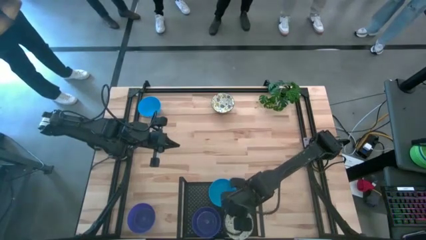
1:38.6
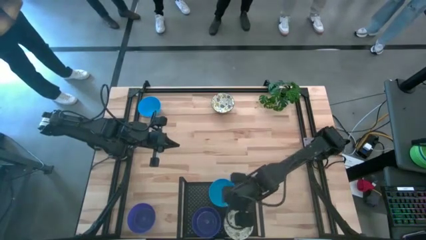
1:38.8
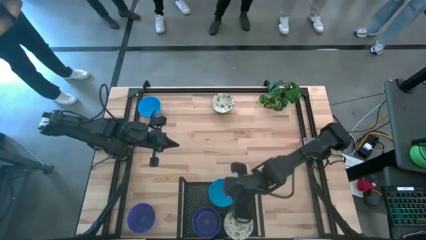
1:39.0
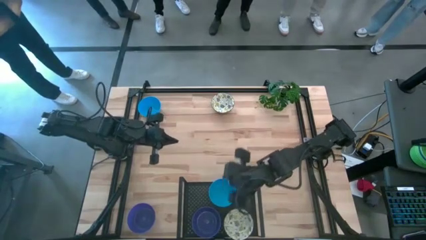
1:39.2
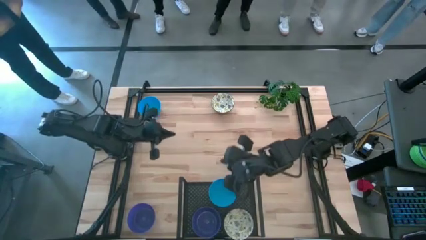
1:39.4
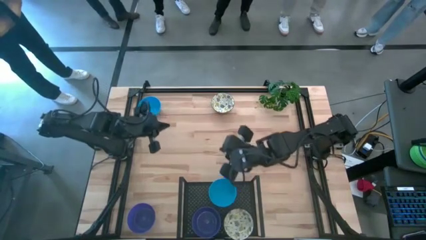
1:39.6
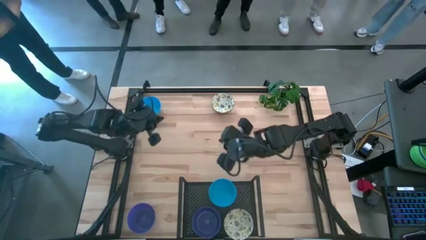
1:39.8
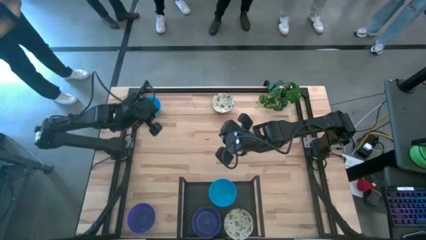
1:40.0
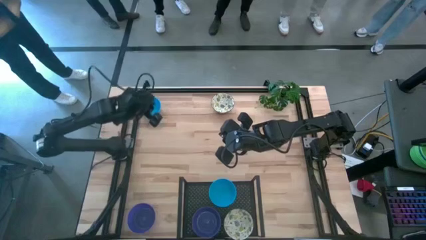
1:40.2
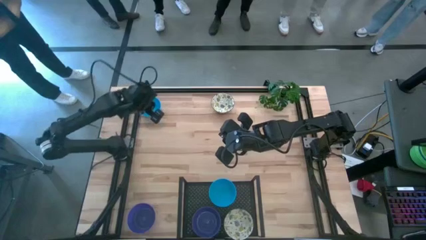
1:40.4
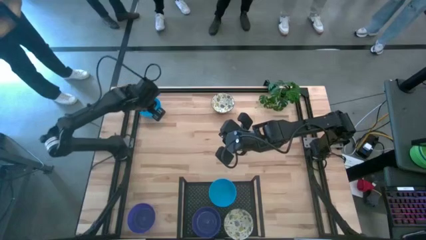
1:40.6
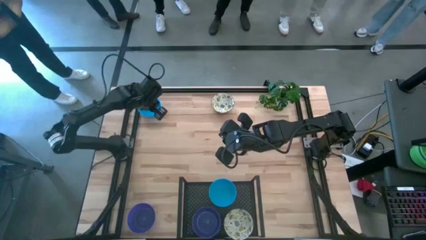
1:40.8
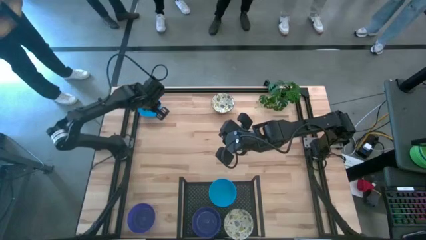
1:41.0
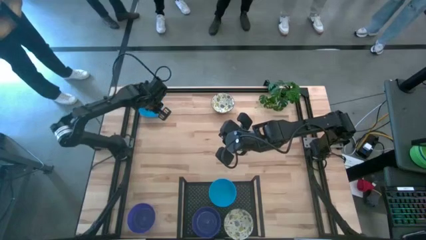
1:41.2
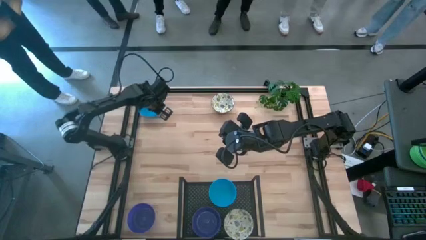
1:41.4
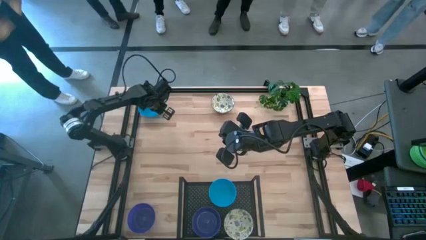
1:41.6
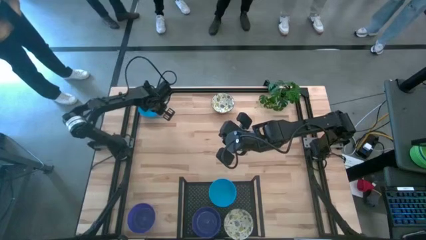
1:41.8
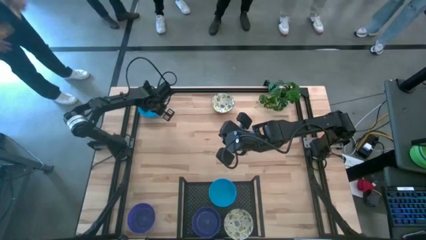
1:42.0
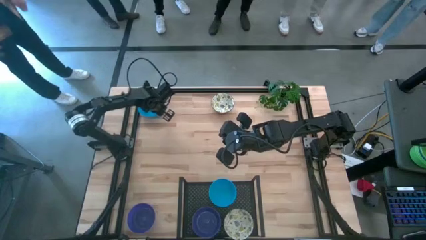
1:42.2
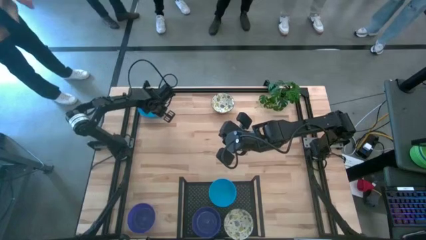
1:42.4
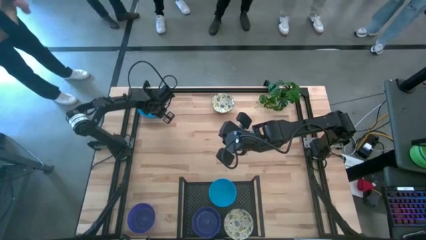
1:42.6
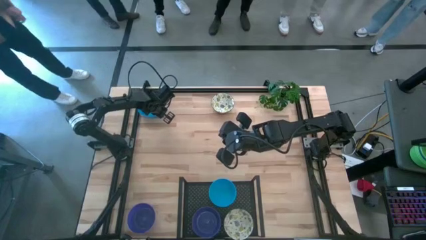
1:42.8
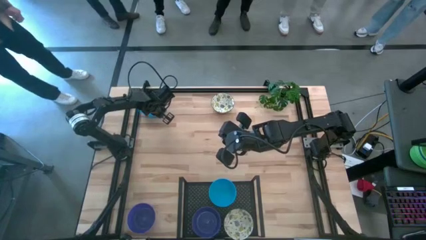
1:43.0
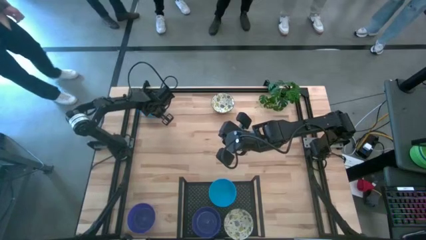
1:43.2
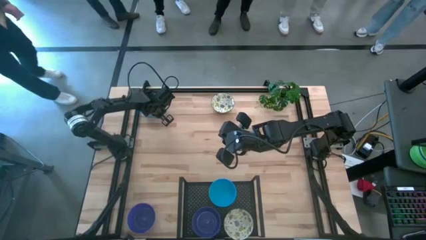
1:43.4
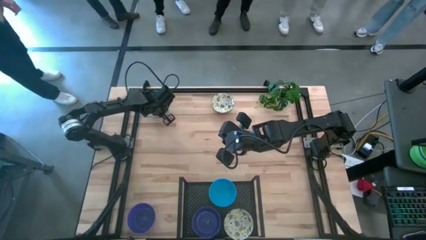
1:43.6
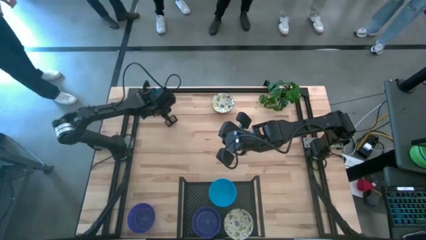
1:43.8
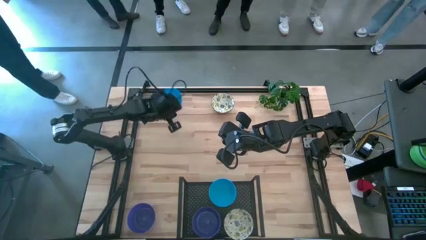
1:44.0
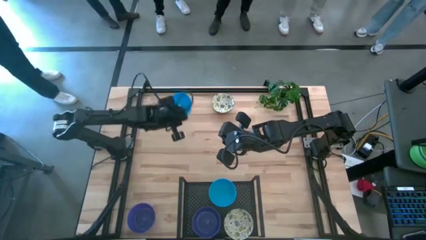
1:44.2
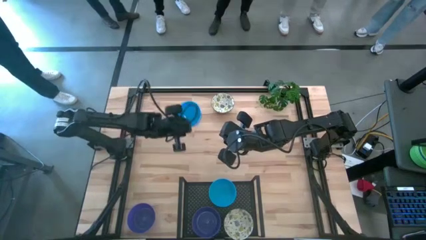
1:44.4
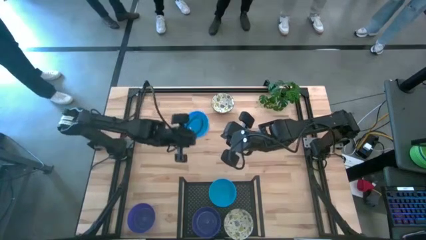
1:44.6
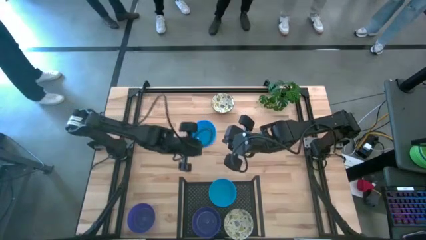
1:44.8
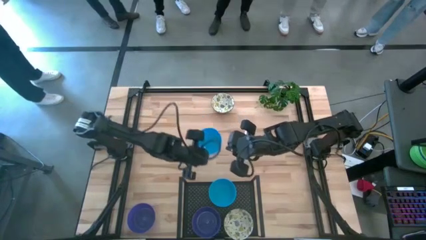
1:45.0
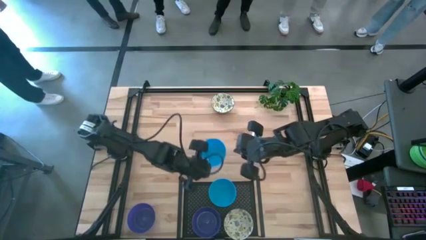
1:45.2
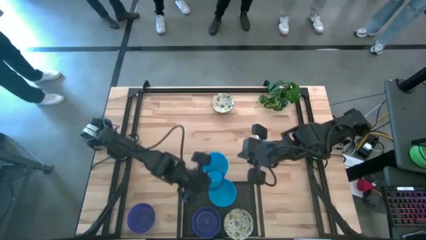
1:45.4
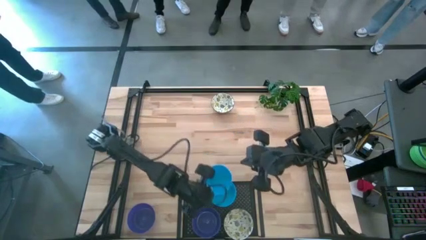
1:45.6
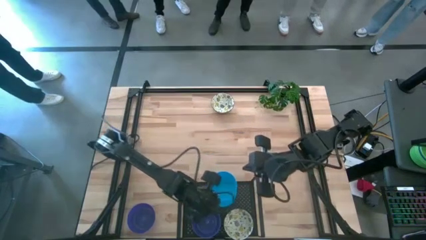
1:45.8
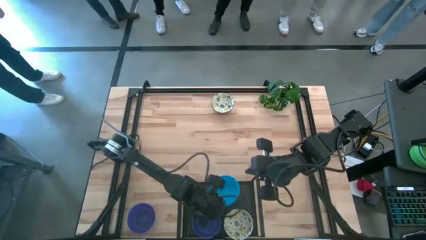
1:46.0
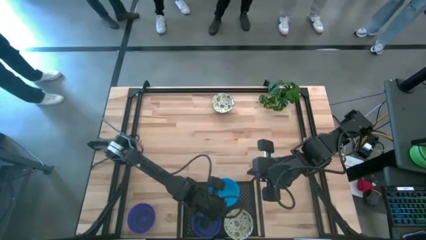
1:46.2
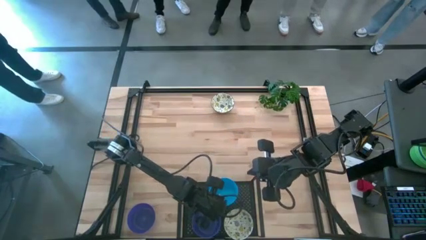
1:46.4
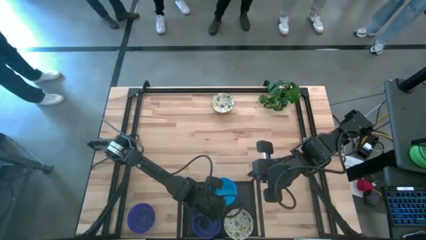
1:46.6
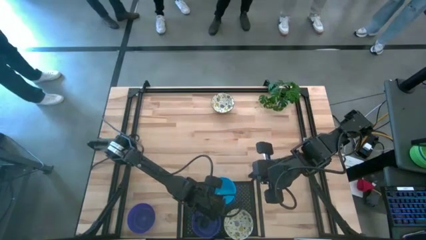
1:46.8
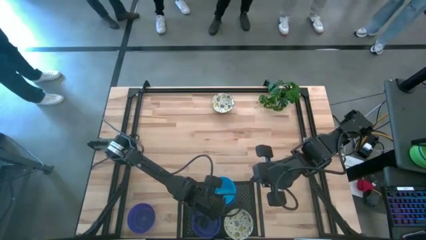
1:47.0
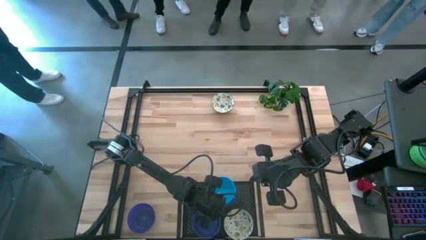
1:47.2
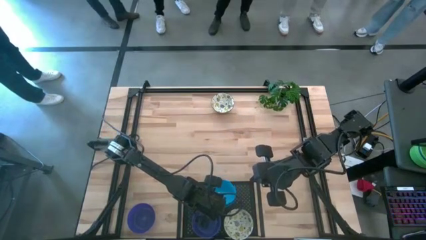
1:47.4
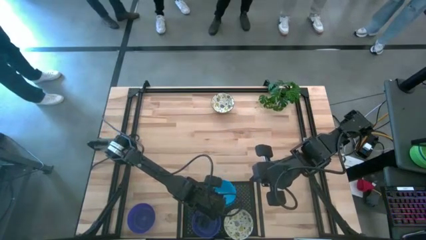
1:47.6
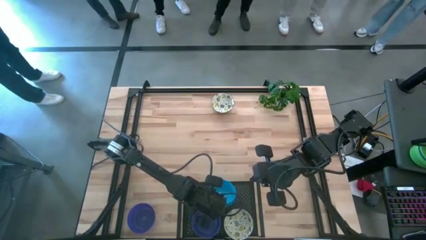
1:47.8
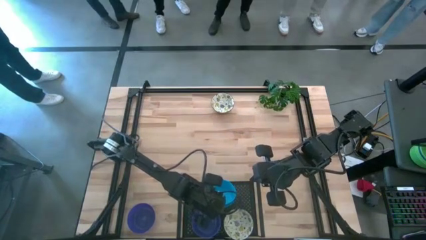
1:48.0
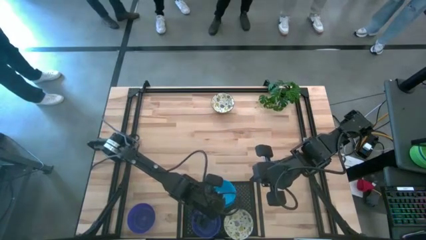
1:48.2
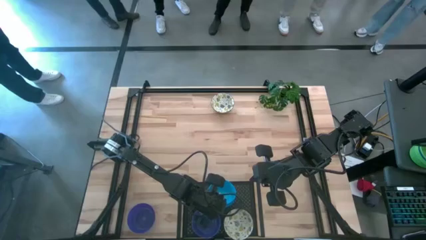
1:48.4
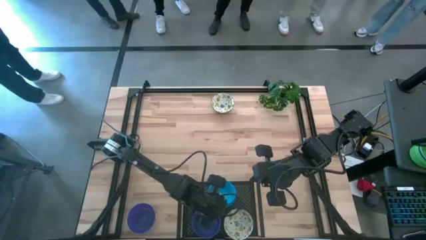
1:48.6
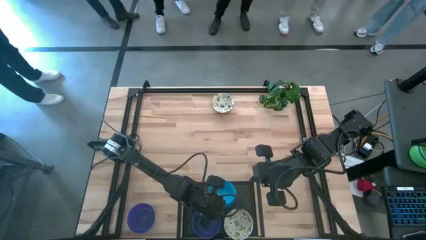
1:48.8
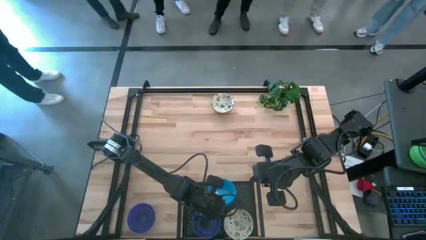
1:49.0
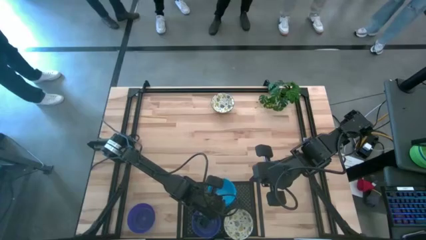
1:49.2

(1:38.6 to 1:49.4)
Task: Pick & Place Mini bowls
Stack the blue bowl on top of the blue bowls on the shelf
